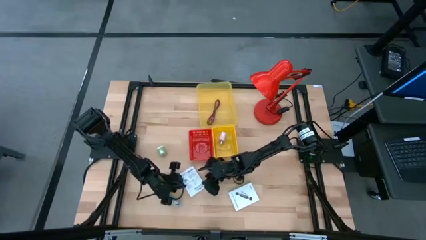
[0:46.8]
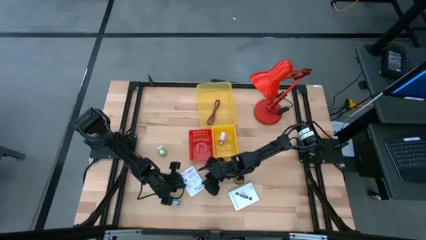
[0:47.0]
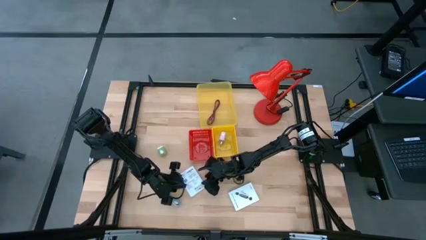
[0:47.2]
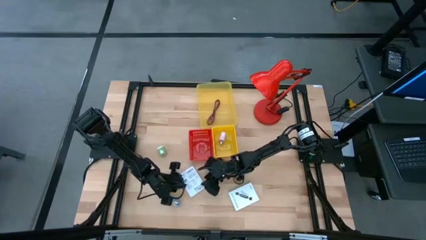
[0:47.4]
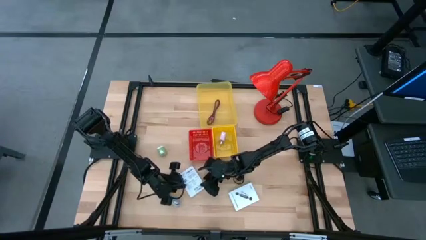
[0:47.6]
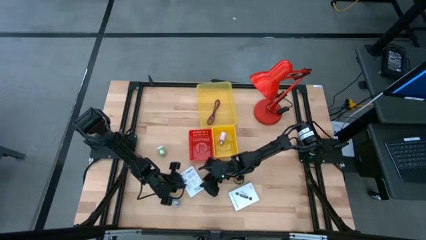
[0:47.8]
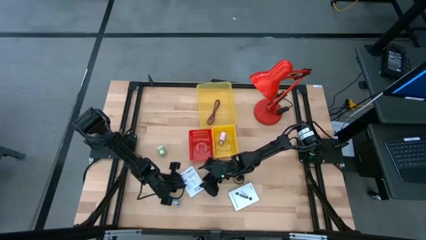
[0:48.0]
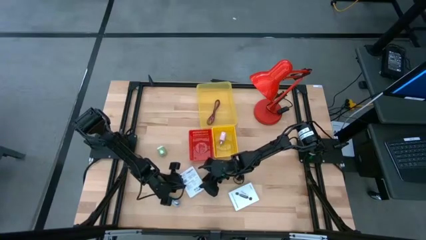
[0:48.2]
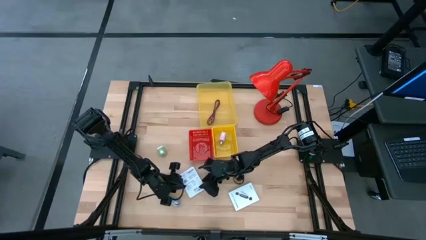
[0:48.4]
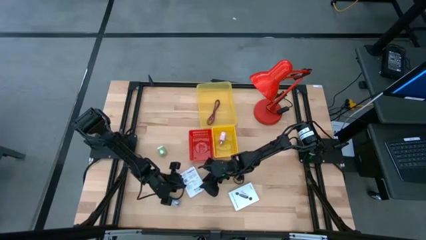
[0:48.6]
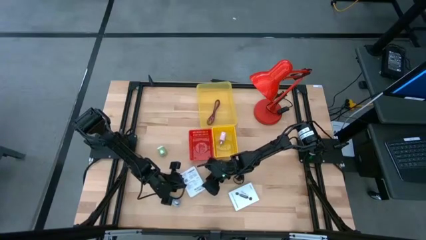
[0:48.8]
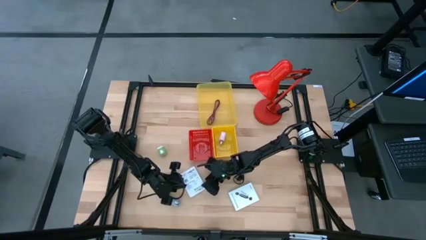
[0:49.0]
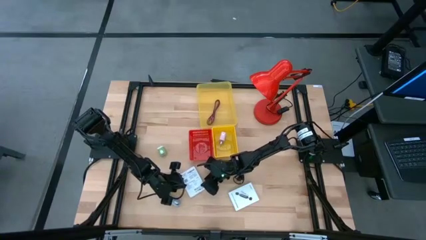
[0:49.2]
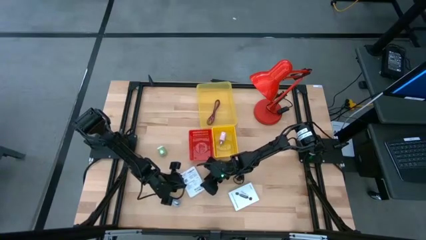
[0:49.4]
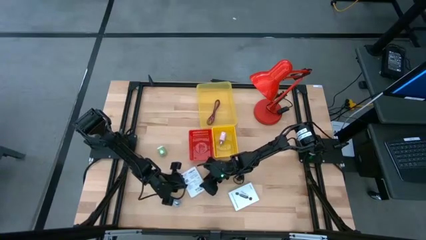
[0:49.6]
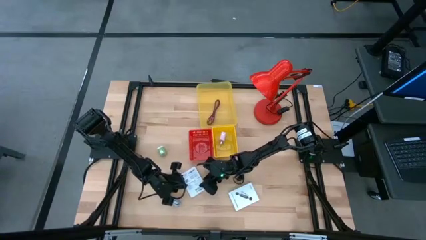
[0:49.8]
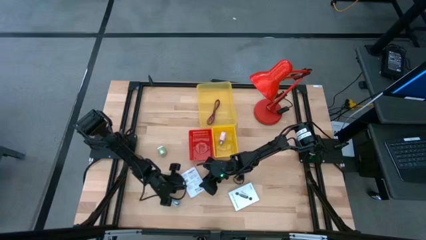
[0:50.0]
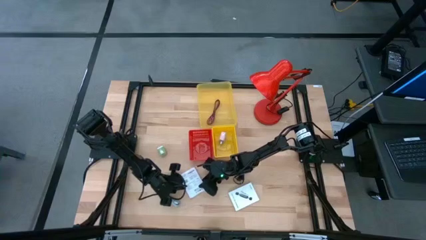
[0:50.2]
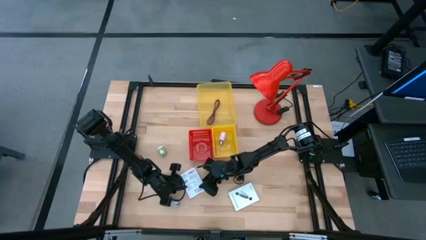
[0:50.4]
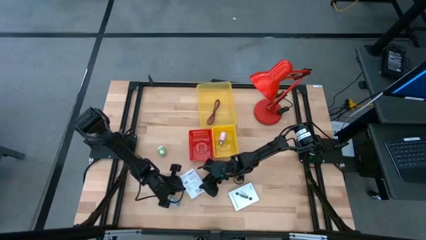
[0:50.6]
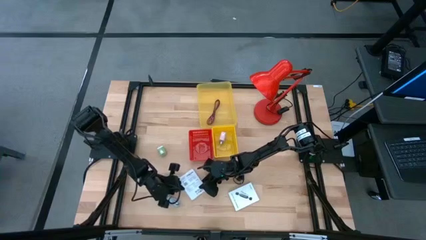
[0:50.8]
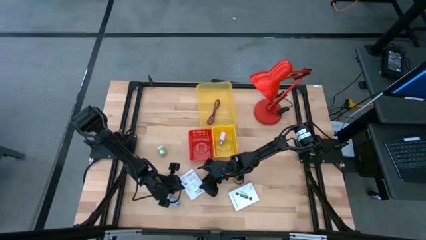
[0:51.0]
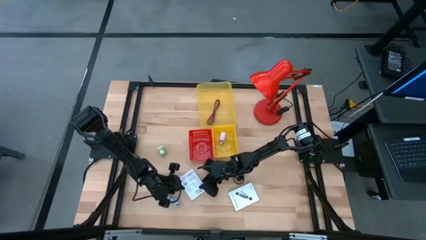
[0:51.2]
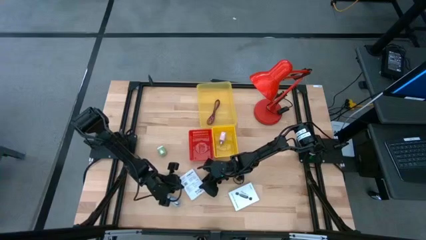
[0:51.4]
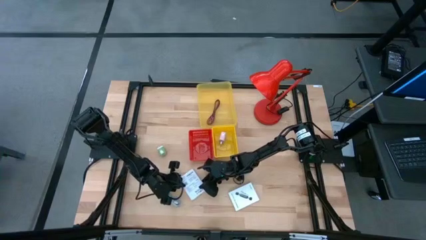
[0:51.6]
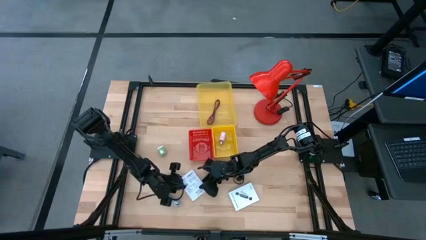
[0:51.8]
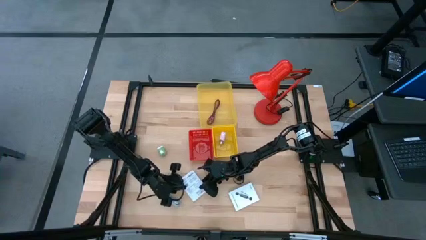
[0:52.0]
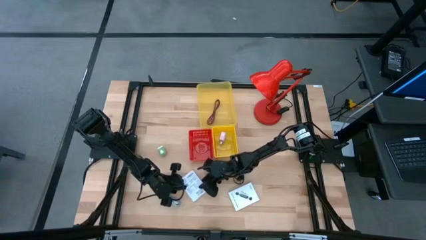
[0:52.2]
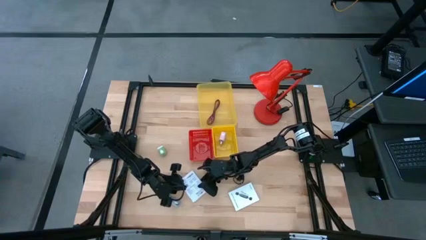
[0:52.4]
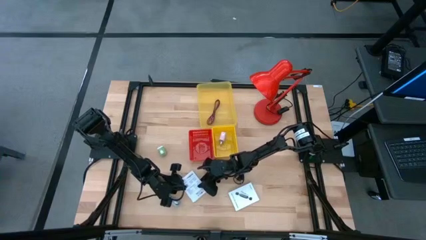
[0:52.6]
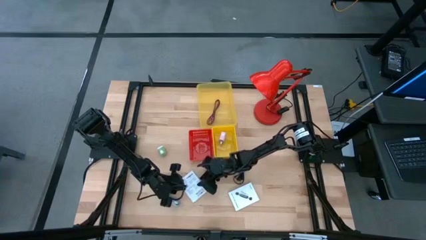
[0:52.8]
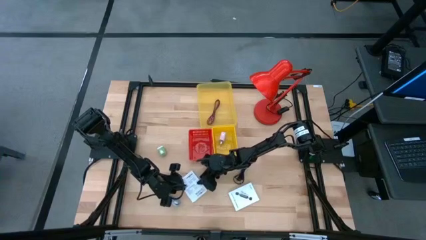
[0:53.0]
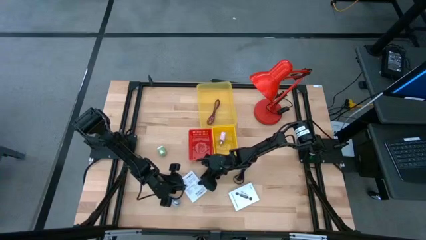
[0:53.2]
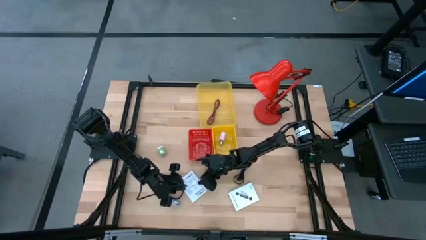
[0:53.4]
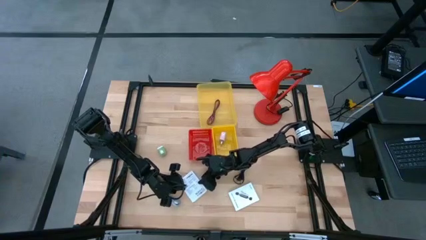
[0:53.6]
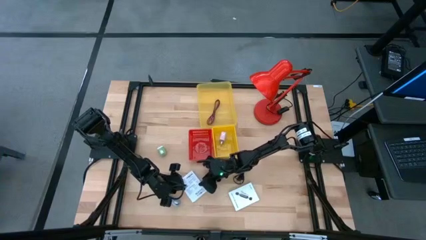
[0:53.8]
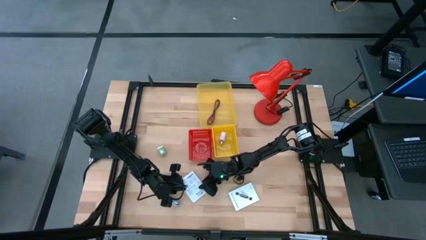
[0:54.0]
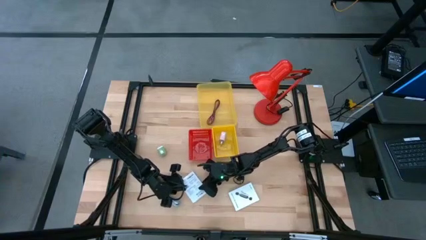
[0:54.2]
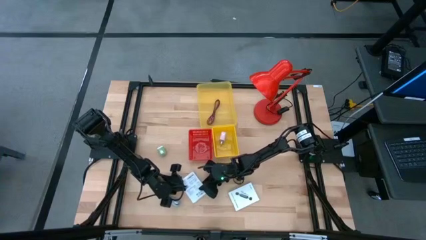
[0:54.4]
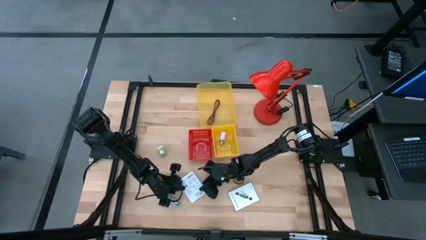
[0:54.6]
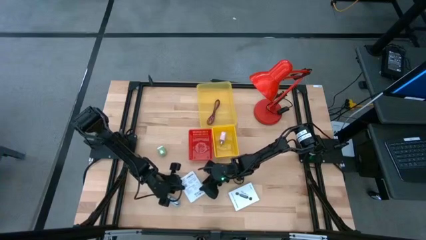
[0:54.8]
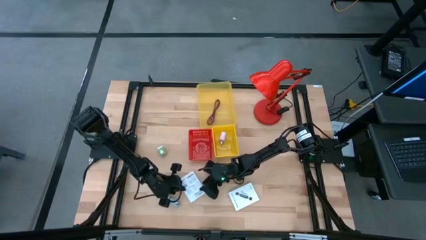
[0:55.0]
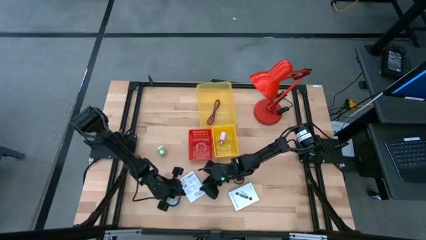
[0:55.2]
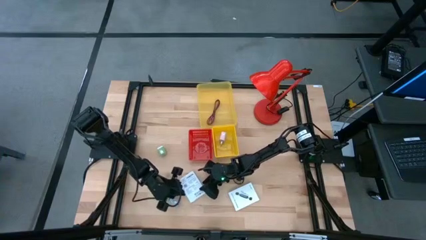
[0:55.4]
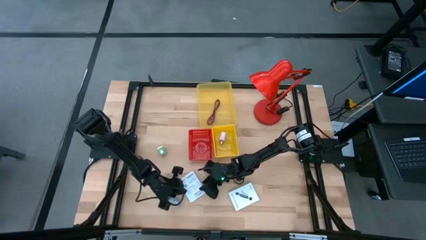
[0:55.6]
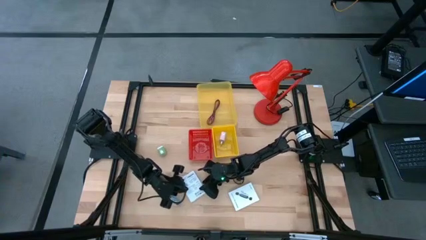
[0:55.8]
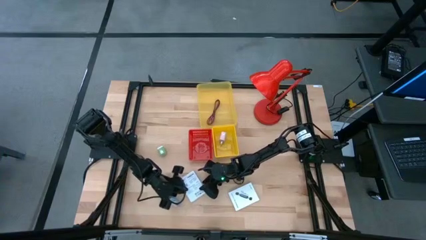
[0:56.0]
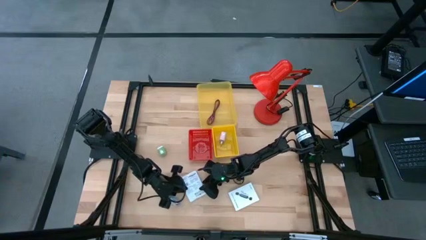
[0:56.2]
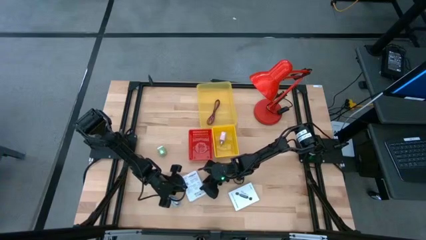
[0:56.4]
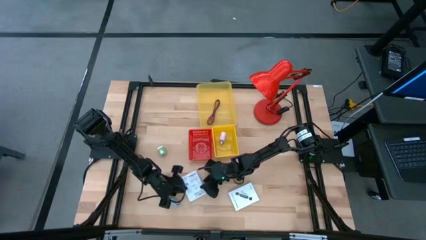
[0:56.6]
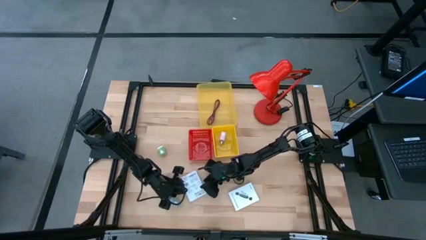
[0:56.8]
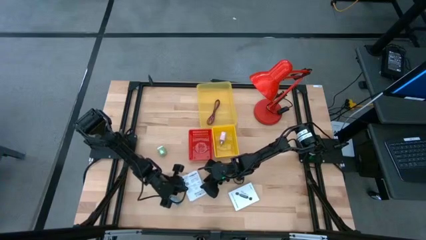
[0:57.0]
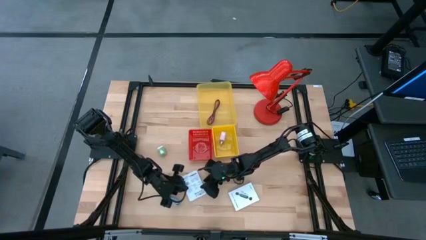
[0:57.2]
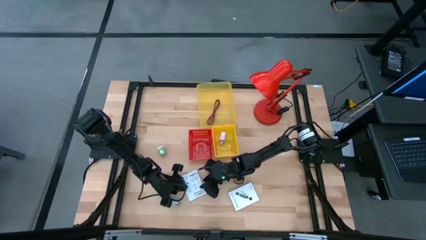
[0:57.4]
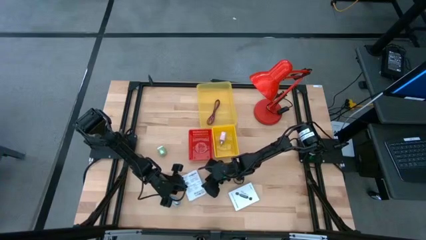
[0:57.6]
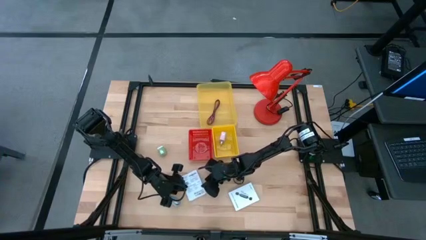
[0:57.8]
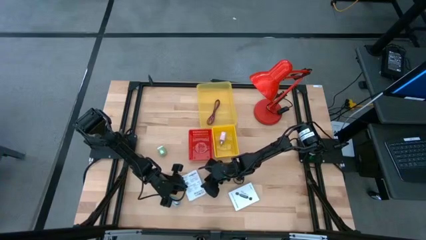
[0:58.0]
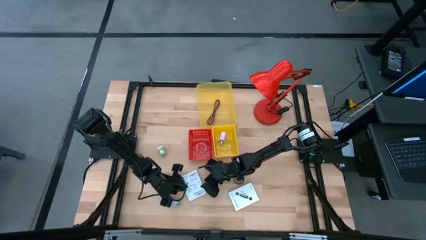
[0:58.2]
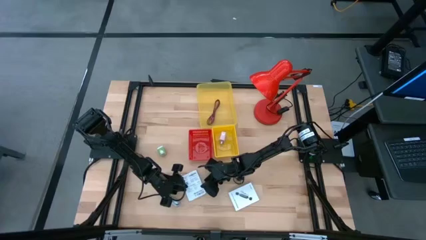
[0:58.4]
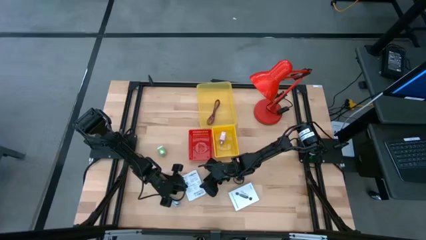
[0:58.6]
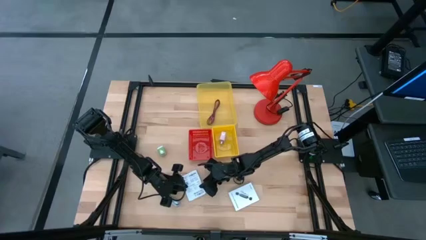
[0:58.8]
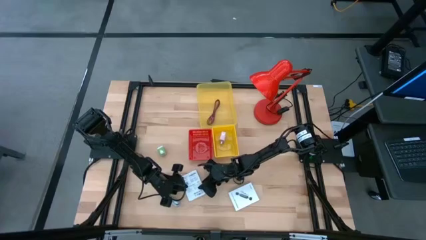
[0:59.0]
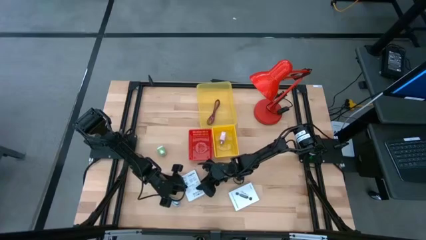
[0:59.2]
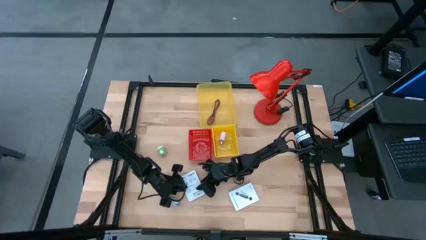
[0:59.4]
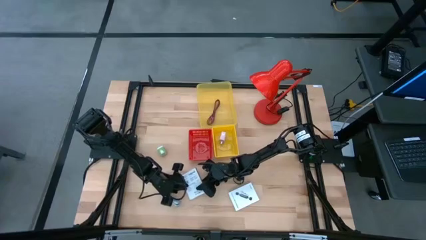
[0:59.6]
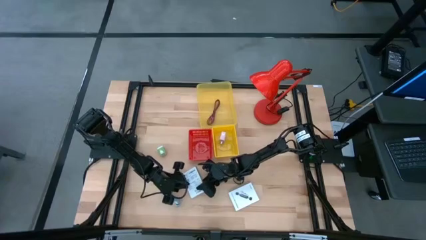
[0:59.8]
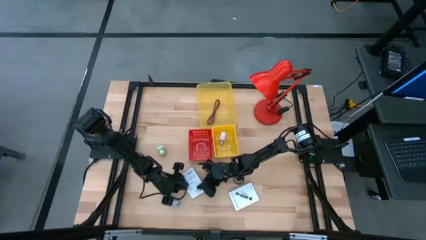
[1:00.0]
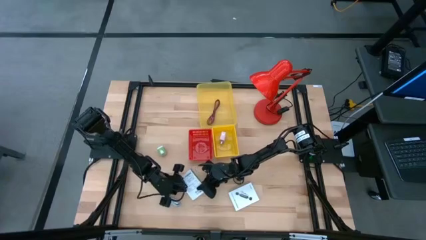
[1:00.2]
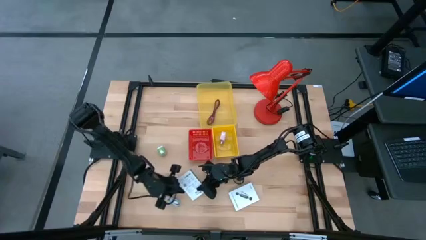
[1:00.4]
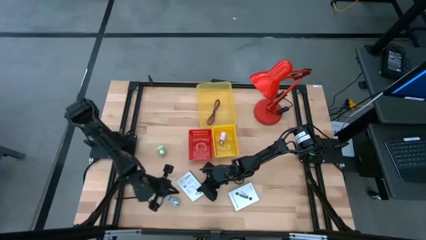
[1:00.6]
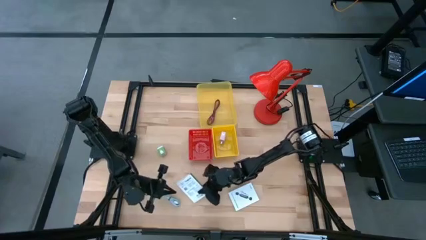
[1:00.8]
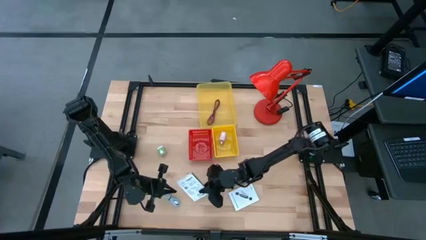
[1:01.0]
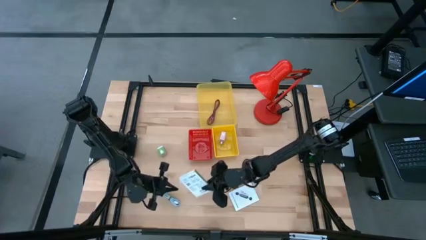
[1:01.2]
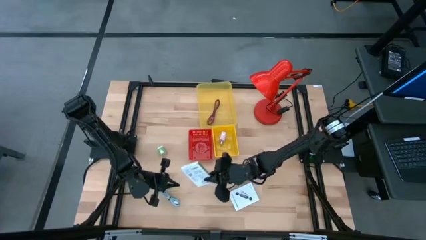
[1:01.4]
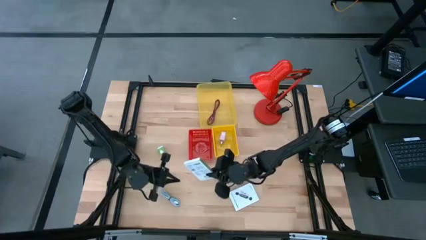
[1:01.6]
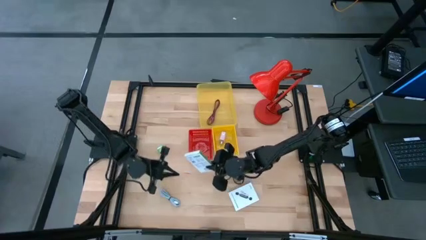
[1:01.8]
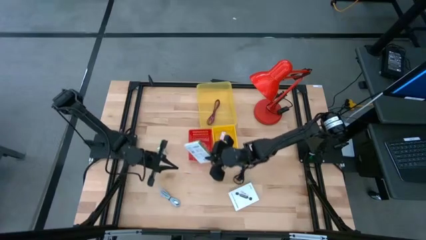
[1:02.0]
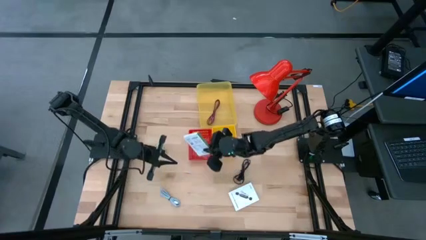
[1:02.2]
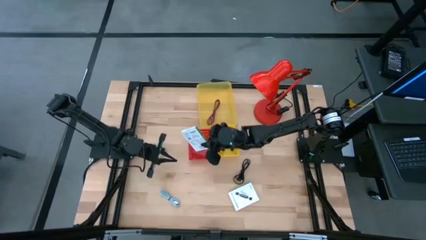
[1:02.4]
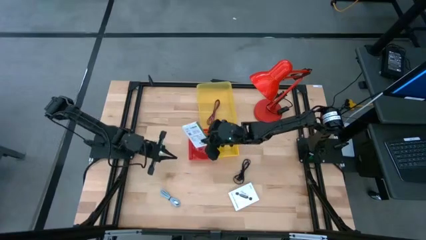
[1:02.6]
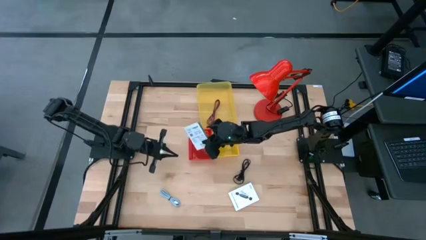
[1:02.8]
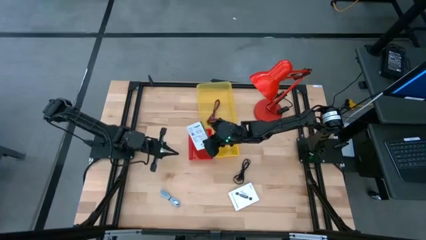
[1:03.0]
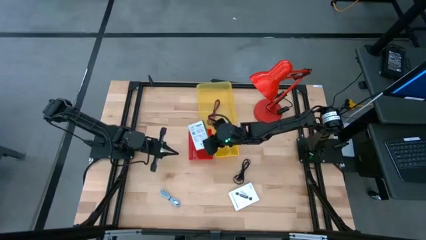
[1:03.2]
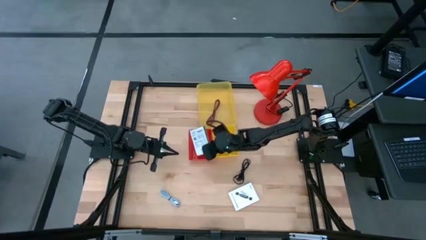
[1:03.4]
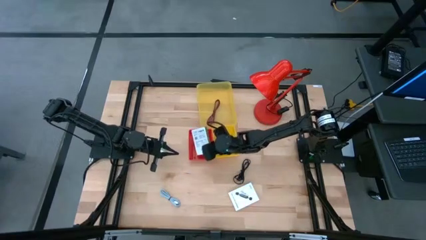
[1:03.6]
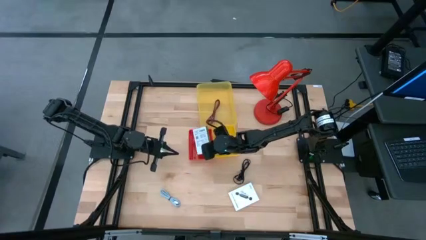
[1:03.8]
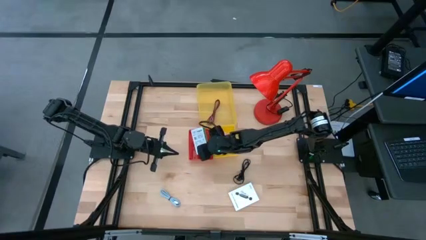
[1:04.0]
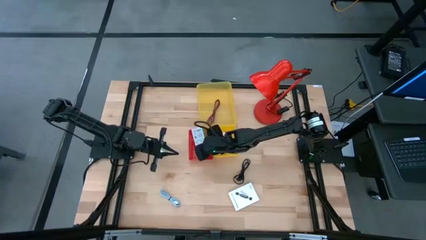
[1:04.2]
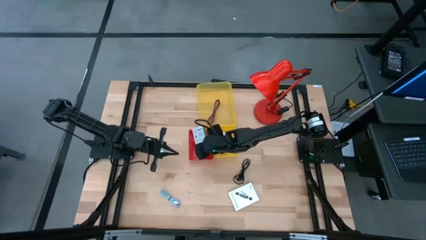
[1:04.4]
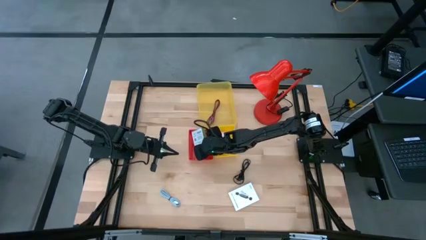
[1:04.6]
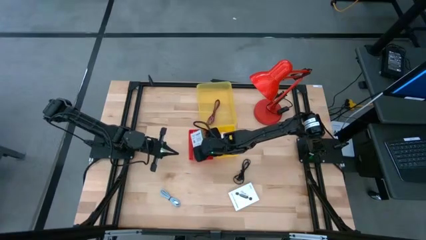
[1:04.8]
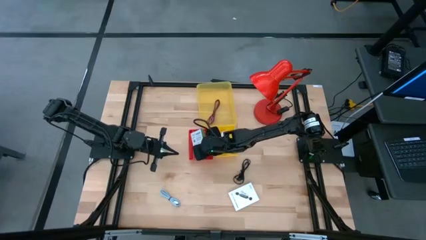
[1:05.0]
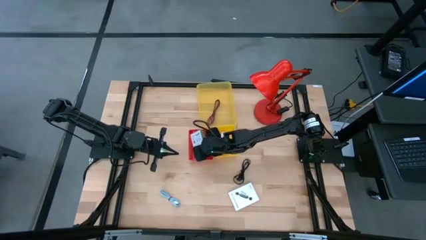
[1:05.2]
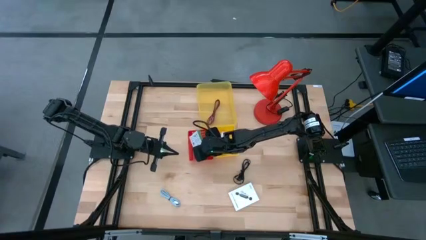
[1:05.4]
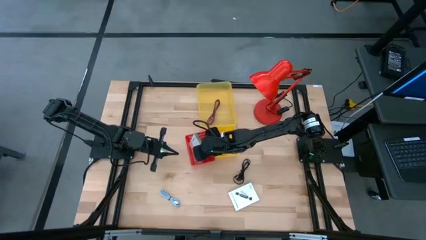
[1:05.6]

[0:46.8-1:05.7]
Task: Pick and place items into bin
Put the left white card reader box into the red bin
